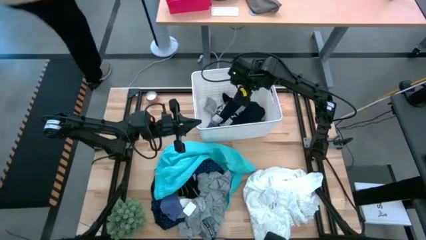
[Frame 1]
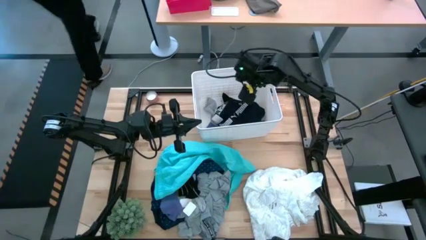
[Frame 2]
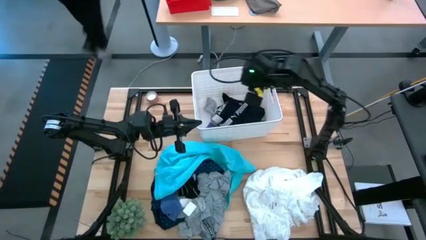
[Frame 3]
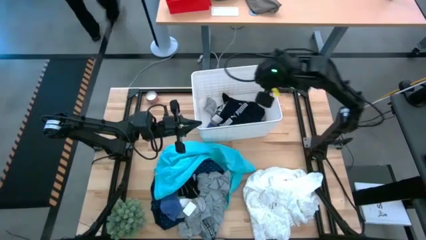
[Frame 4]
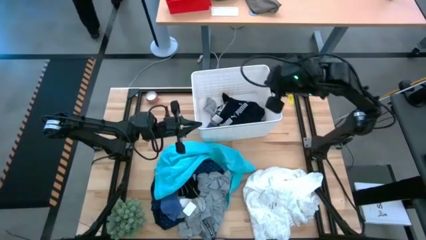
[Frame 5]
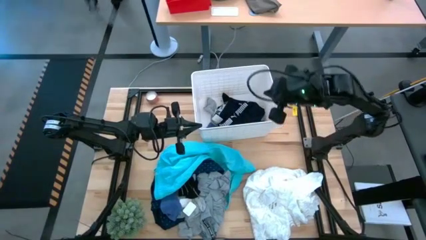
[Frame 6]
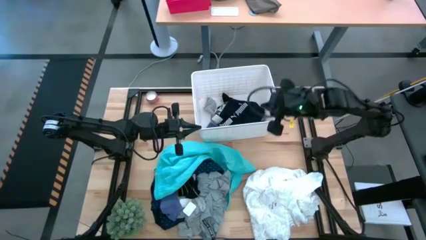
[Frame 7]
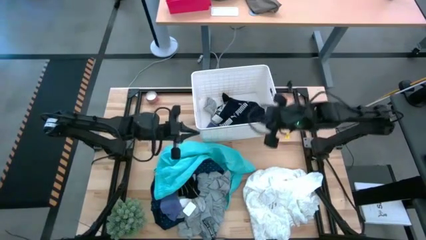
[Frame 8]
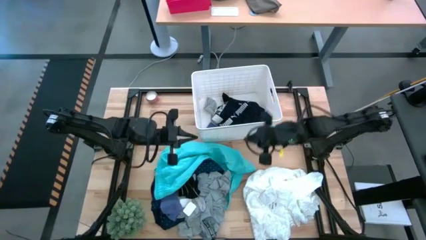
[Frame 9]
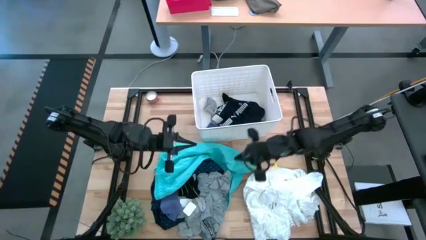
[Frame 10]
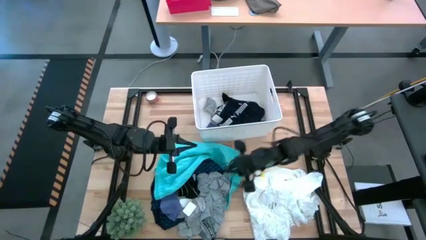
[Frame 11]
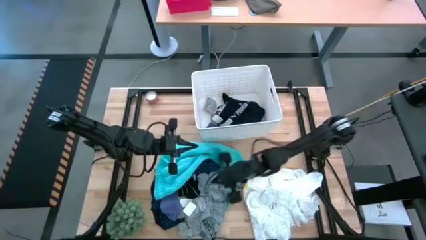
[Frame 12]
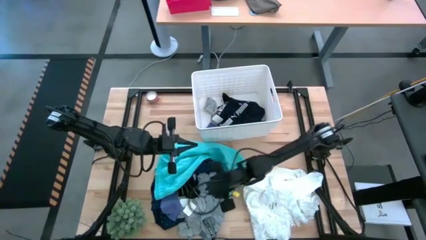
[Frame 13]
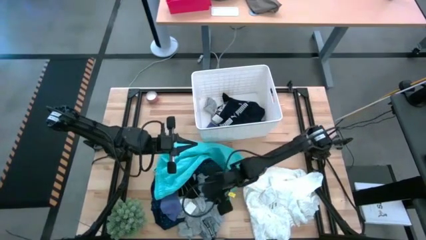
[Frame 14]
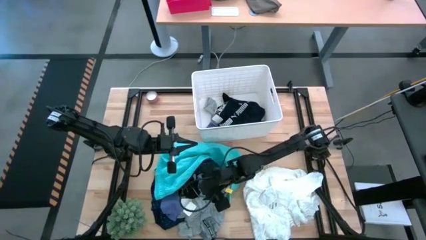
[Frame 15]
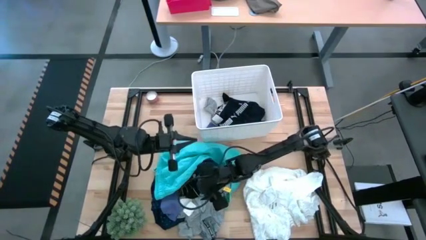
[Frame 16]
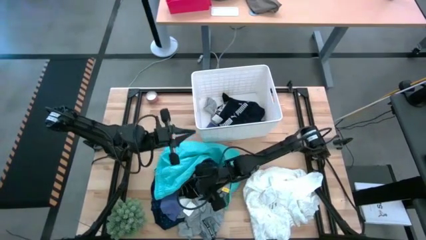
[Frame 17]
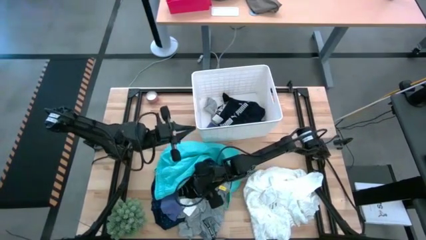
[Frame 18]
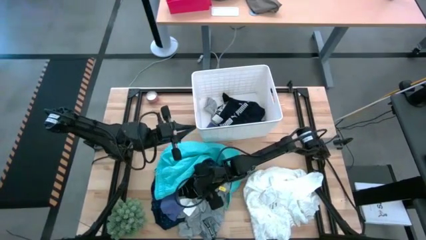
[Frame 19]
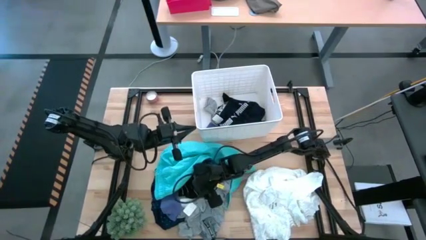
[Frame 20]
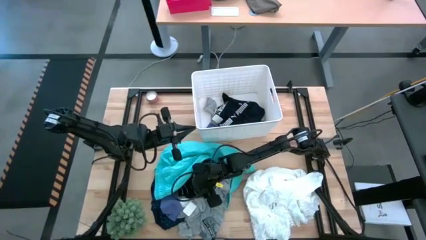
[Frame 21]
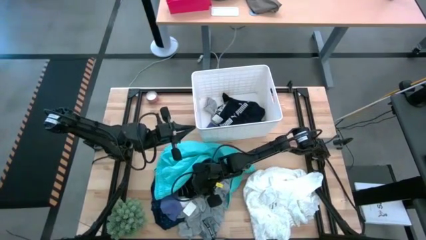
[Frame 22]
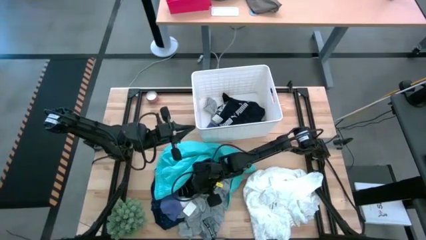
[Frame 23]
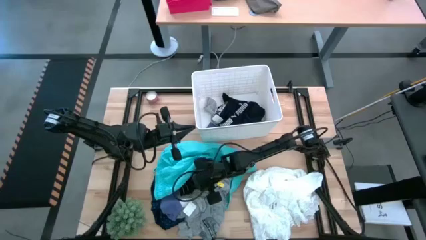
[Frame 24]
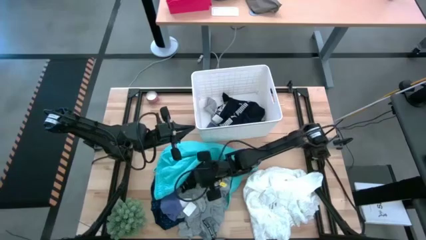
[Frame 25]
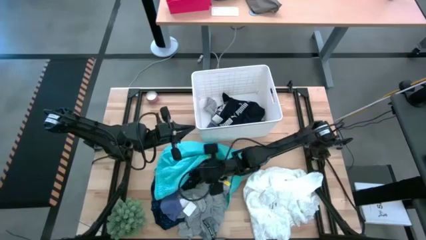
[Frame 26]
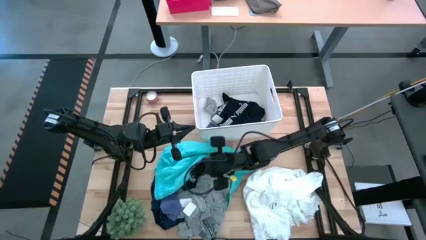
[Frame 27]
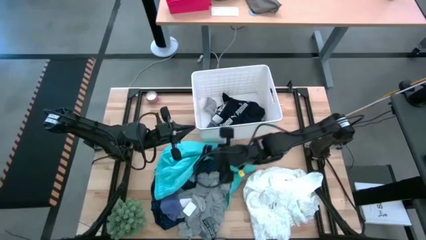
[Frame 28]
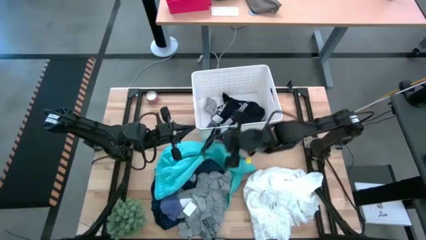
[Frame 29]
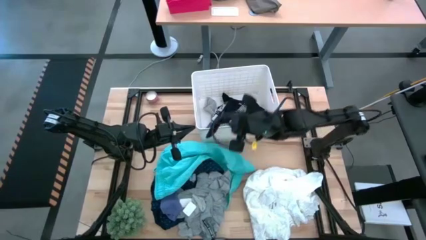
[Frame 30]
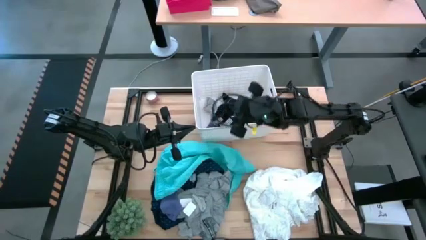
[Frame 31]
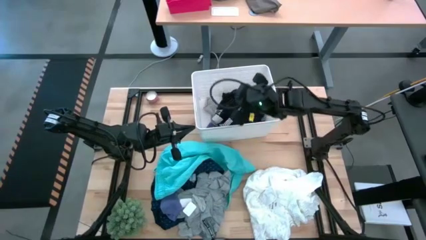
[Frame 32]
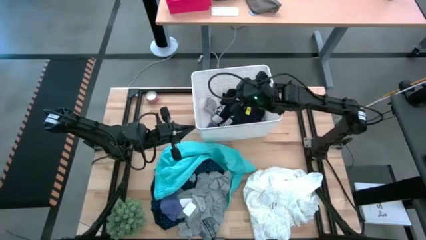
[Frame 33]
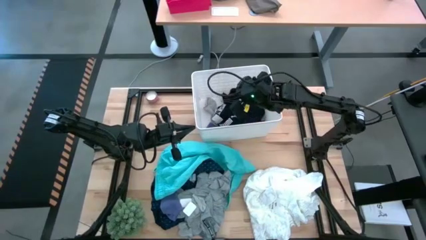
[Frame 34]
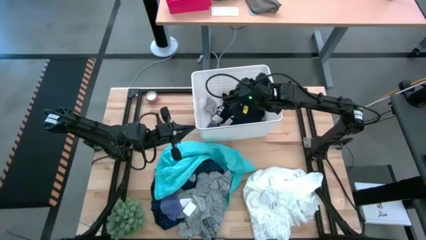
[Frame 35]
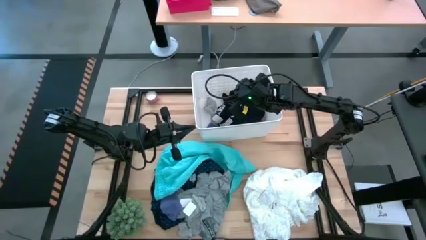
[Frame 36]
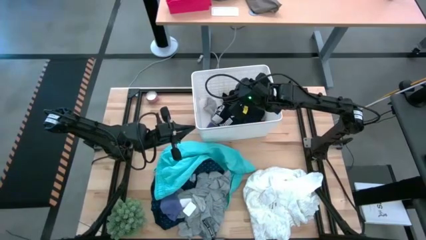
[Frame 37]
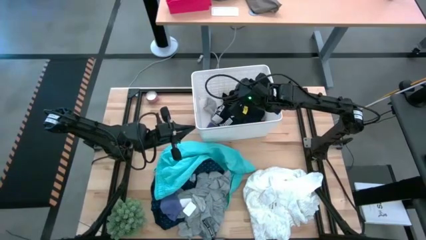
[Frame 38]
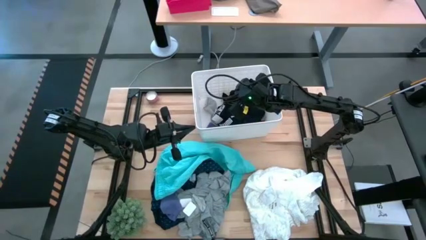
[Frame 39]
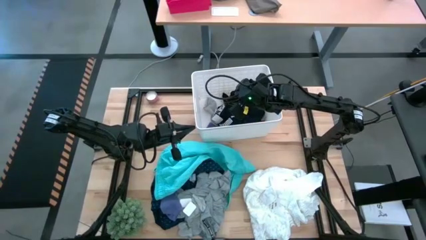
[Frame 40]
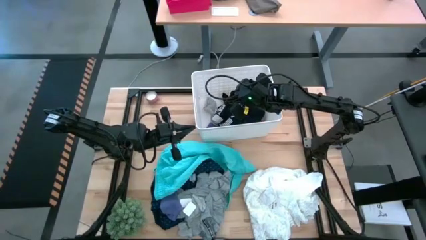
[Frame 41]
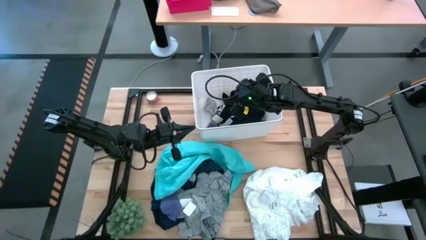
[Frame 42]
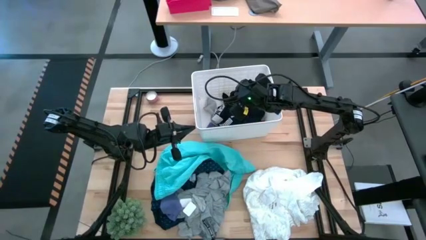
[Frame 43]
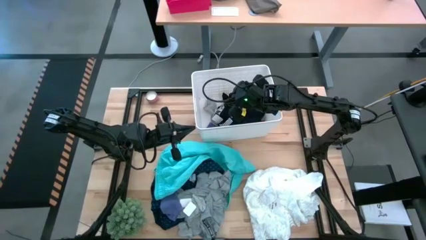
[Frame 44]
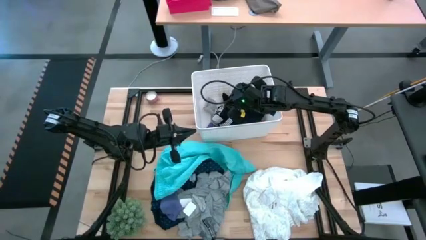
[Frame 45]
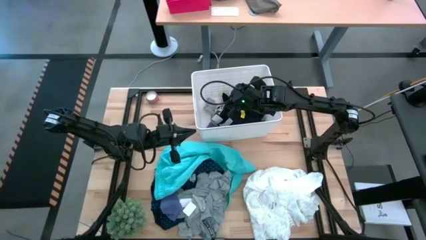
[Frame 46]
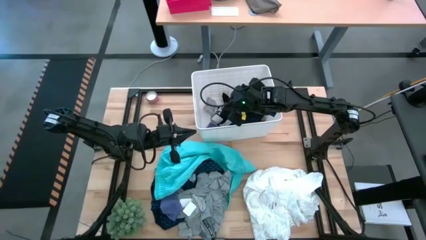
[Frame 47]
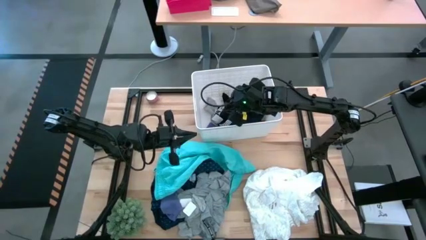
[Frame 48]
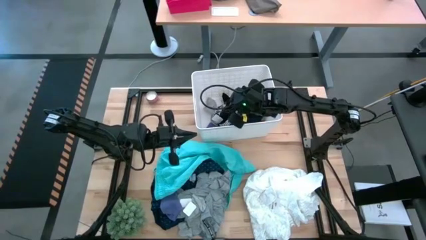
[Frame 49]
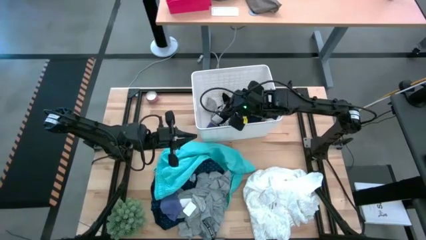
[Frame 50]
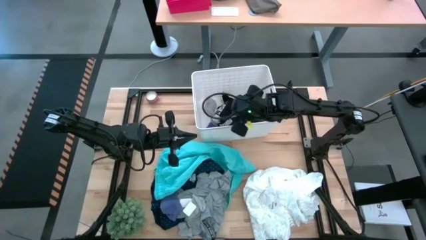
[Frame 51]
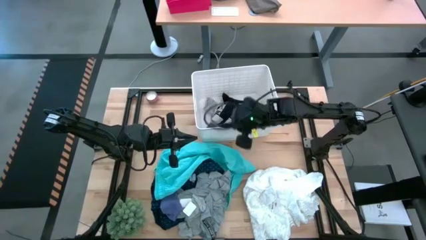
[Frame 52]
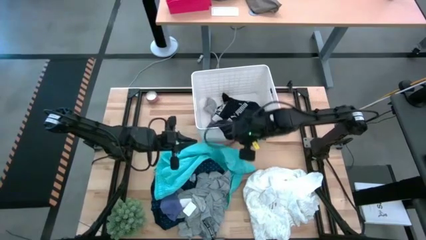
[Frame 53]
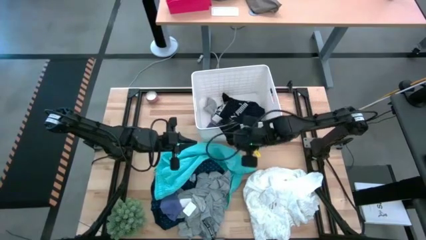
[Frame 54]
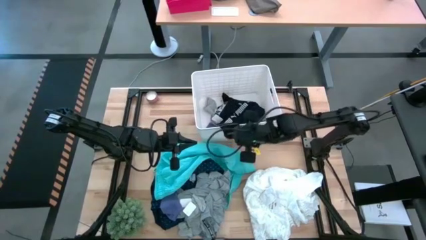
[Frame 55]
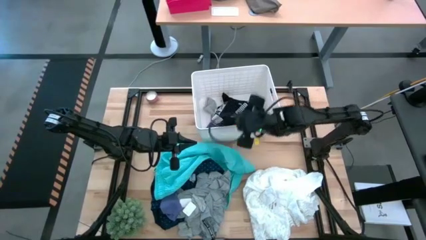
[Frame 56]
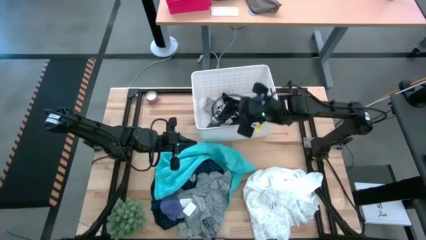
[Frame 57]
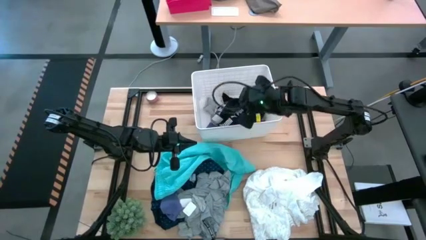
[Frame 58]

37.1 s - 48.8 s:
Task: Sort clothes
Put the black sock in the bin

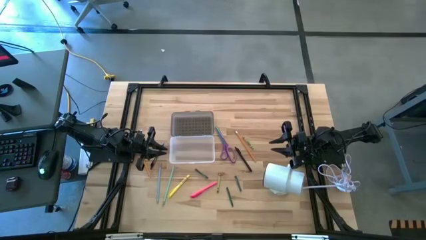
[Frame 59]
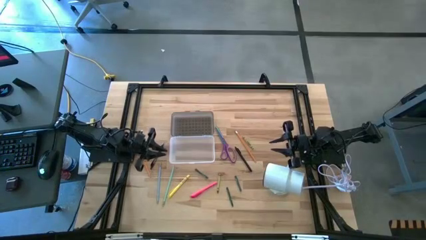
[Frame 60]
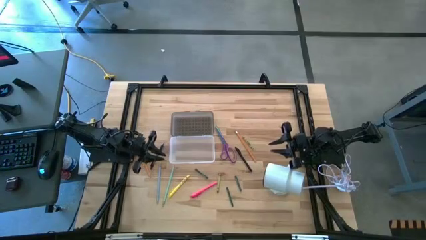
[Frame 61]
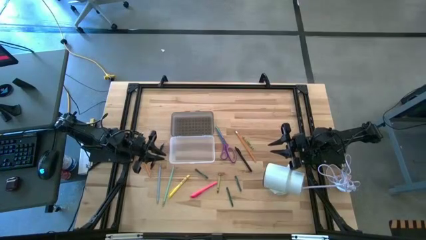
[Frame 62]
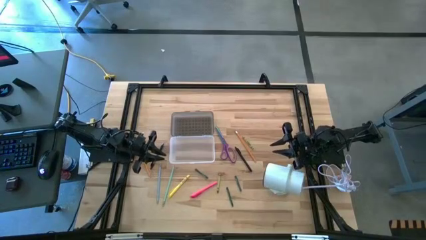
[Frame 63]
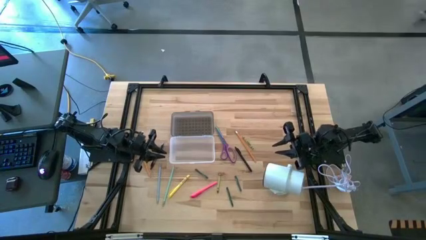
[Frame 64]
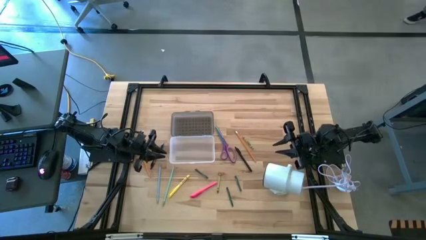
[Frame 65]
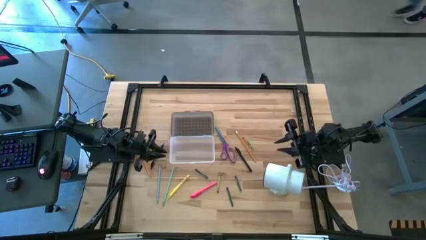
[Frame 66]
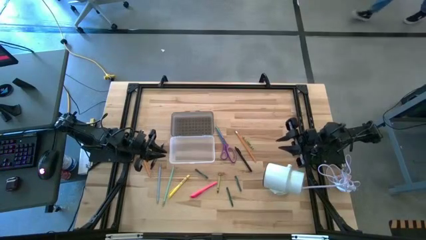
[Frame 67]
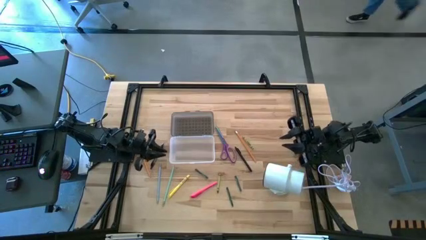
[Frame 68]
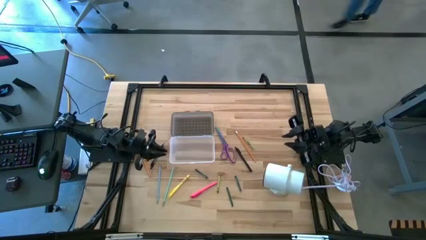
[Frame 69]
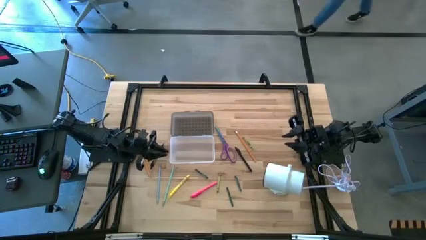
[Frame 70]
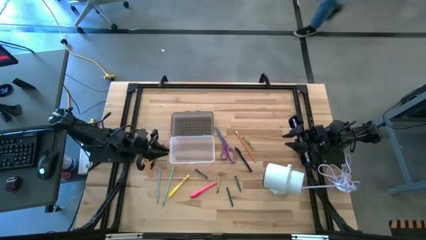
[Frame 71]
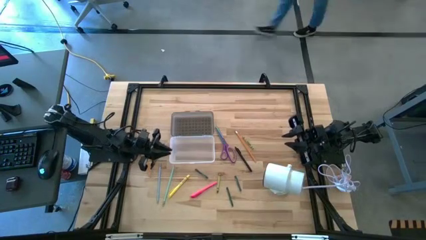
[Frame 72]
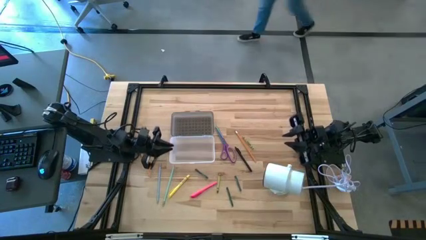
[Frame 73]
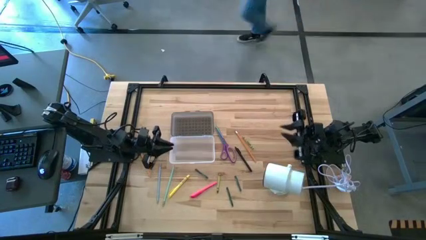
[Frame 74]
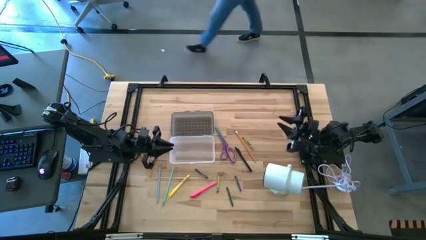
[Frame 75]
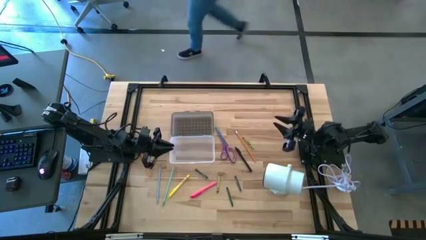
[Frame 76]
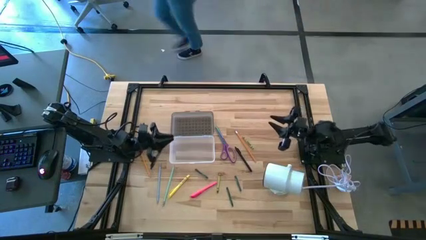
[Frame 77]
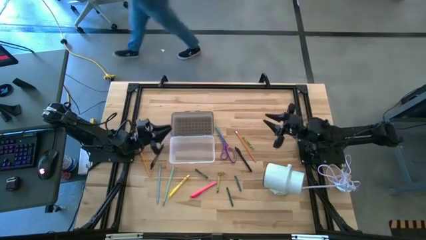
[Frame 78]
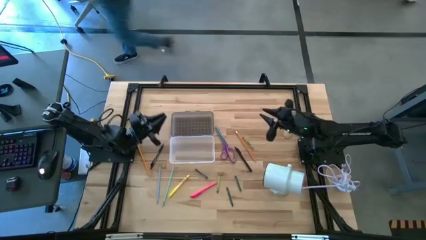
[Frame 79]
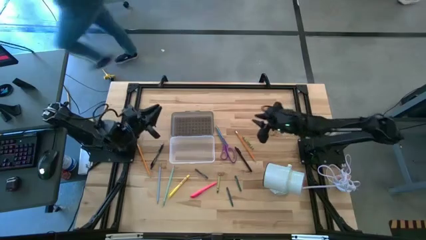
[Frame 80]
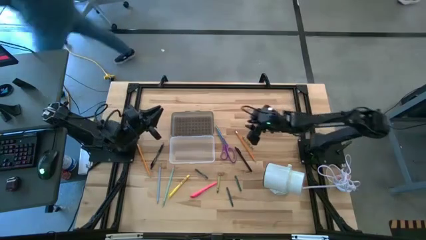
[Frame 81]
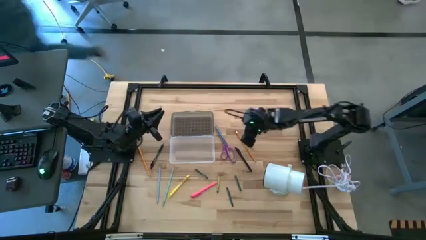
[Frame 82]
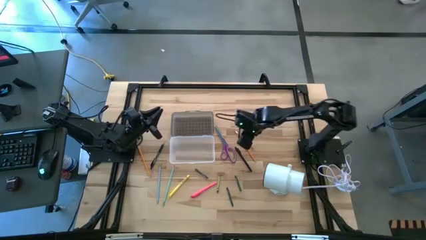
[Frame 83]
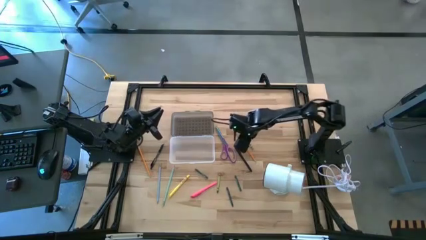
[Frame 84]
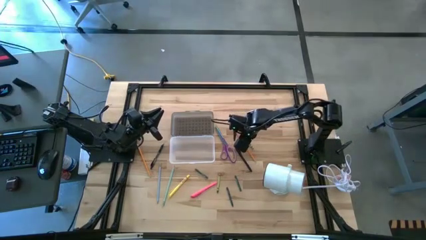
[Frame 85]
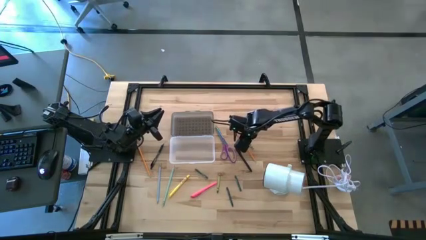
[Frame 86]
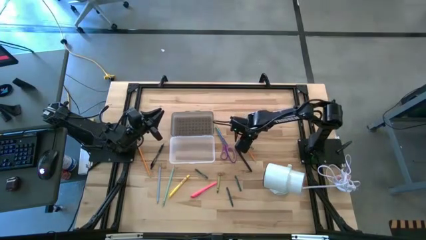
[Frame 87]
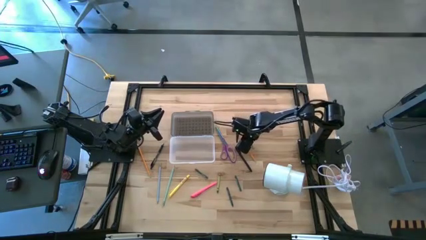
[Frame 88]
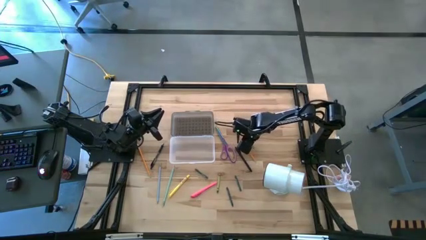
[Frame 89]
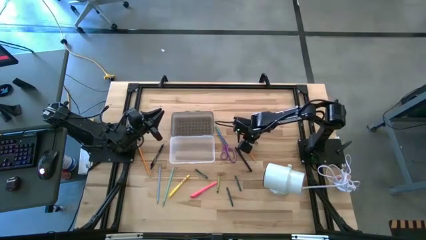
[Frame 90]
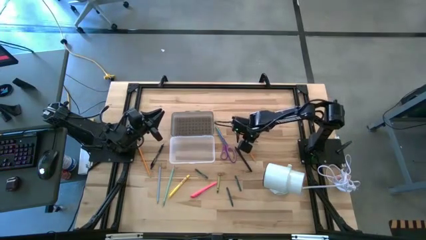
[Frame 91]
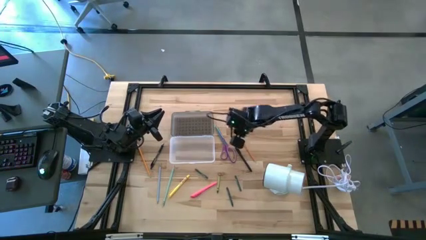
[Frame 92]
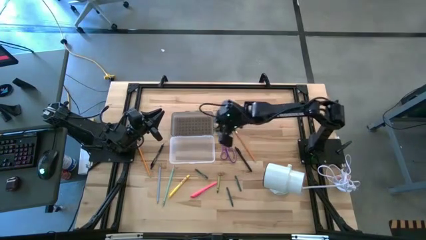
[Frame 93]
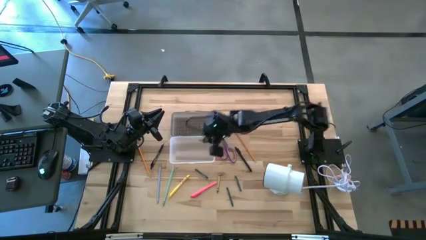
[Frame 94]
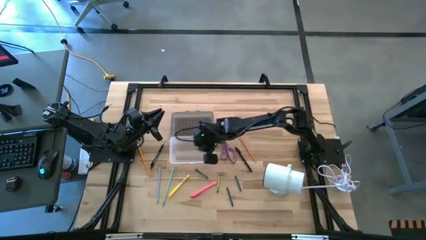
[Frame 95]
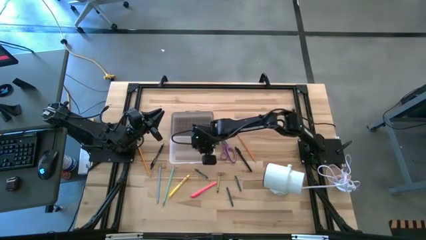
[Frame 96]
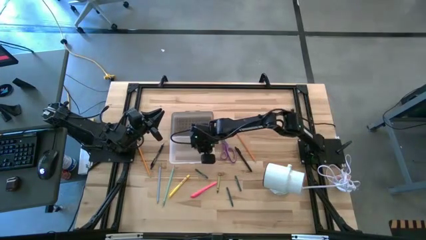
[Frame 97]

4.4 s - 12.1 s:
Task: Pick & place school supplies into a supply box
Put the green crayon into the gray supply box
